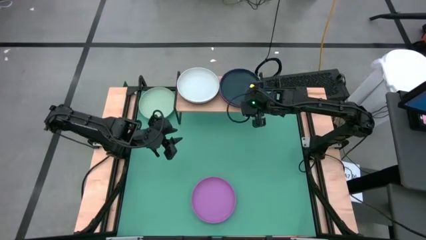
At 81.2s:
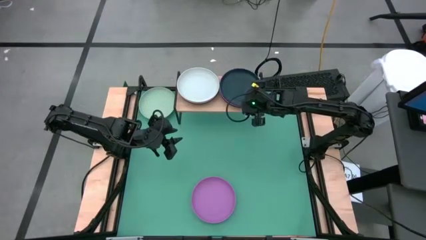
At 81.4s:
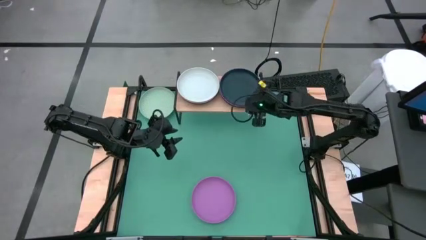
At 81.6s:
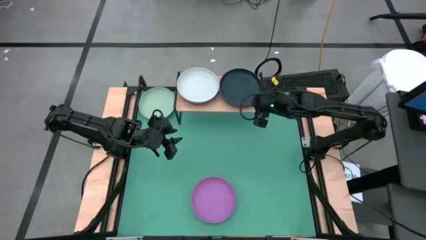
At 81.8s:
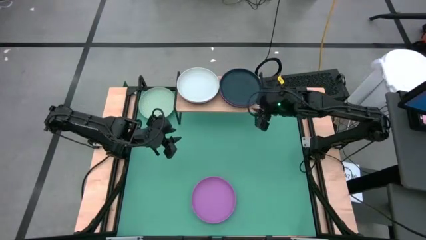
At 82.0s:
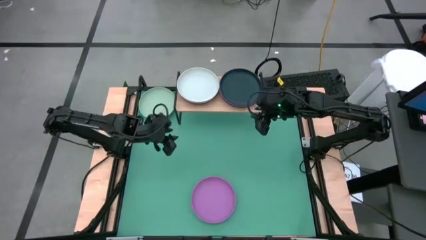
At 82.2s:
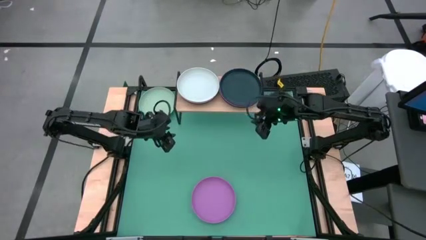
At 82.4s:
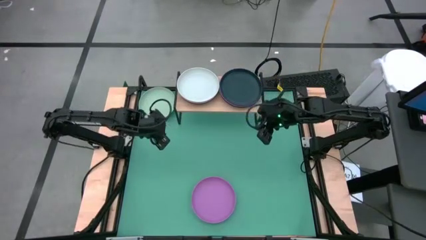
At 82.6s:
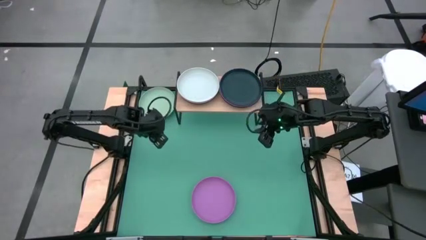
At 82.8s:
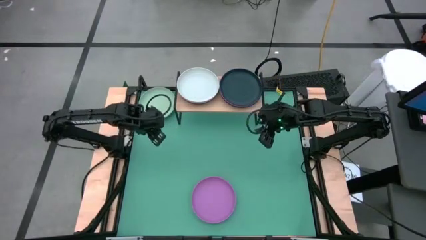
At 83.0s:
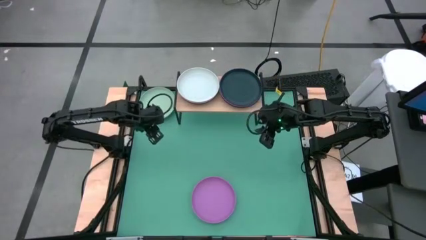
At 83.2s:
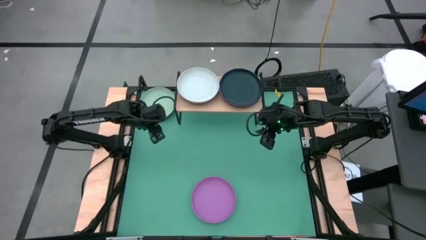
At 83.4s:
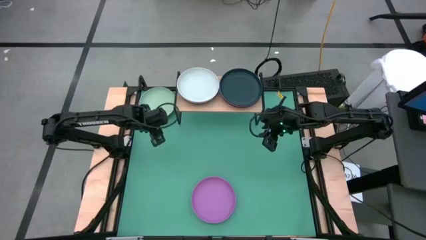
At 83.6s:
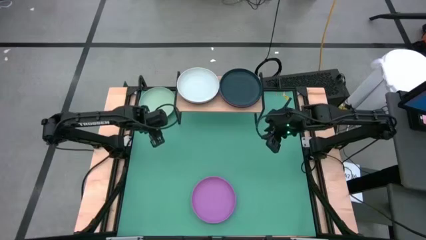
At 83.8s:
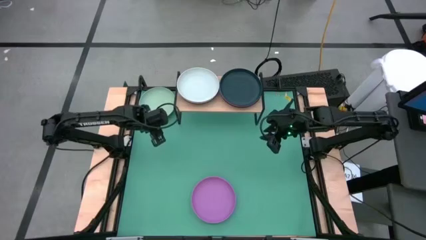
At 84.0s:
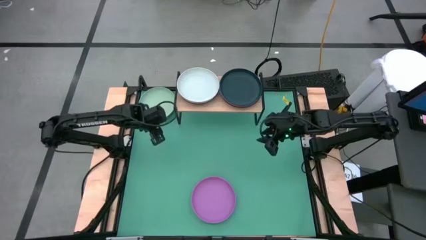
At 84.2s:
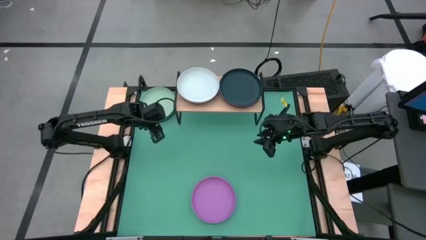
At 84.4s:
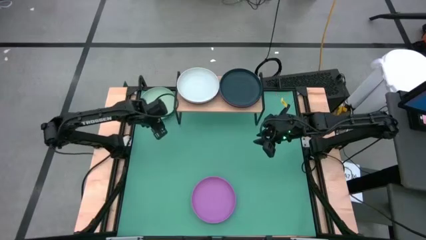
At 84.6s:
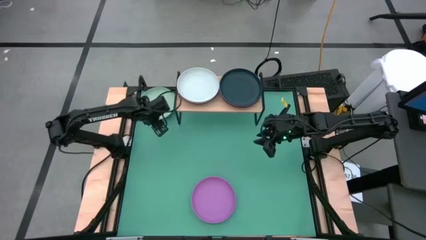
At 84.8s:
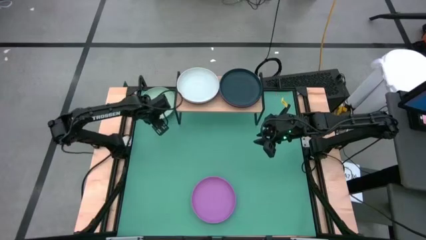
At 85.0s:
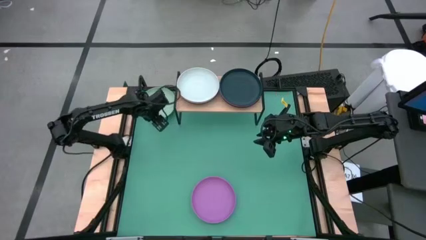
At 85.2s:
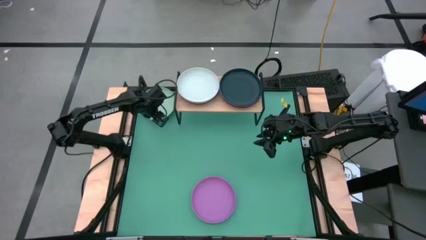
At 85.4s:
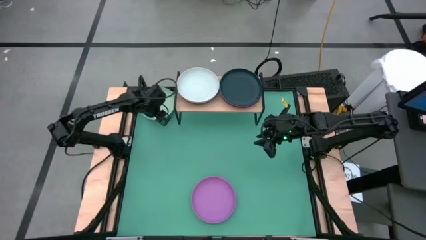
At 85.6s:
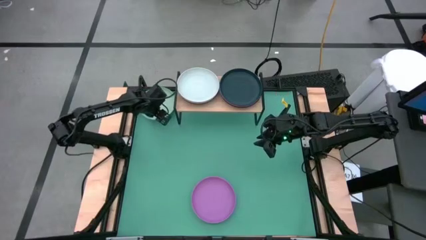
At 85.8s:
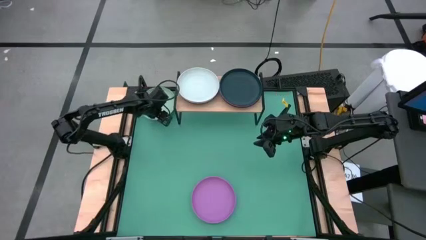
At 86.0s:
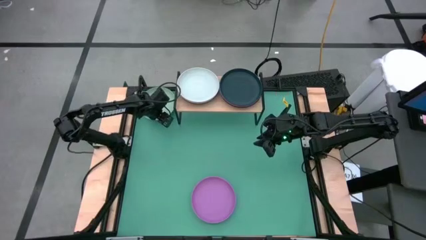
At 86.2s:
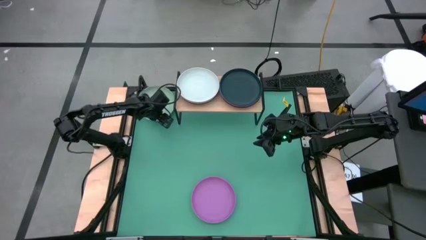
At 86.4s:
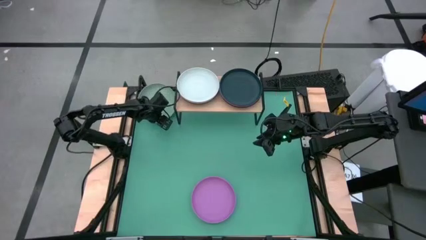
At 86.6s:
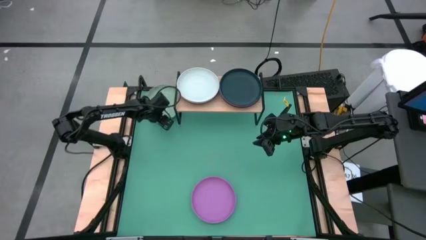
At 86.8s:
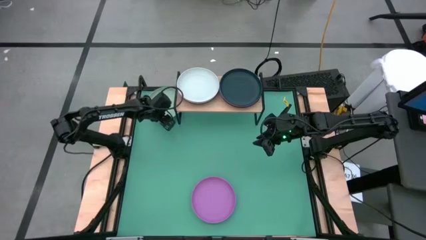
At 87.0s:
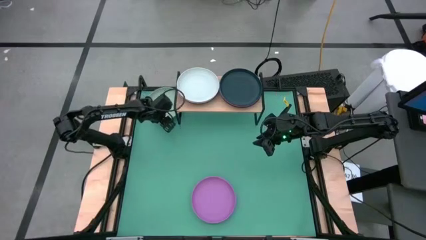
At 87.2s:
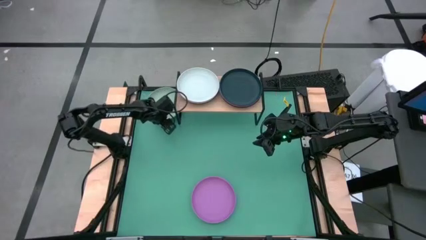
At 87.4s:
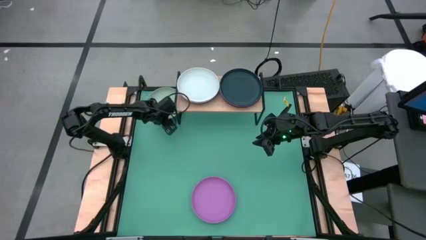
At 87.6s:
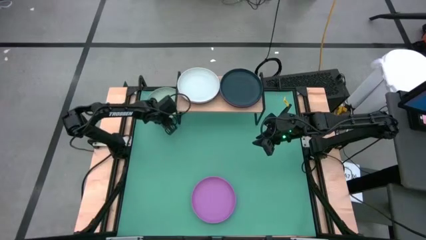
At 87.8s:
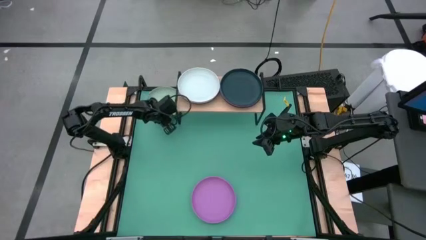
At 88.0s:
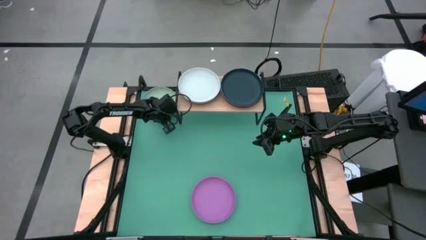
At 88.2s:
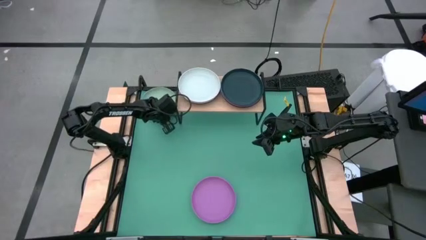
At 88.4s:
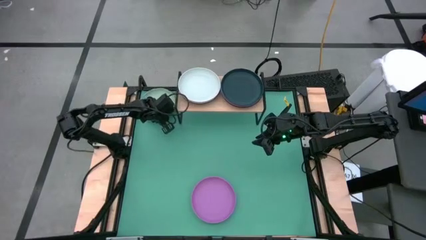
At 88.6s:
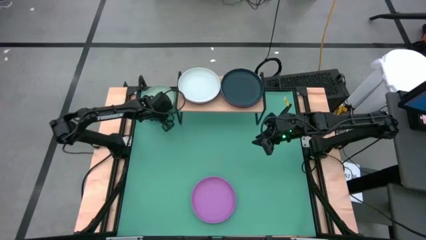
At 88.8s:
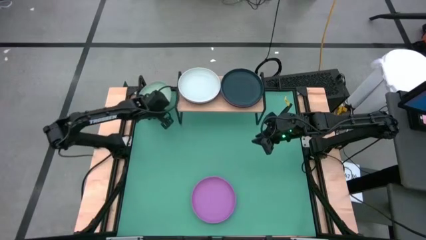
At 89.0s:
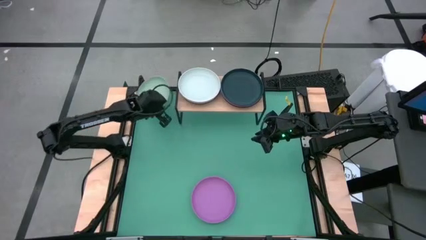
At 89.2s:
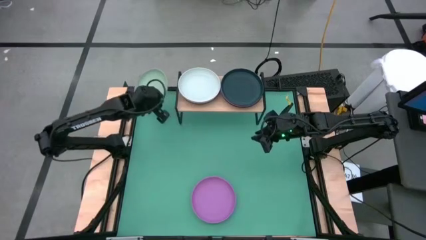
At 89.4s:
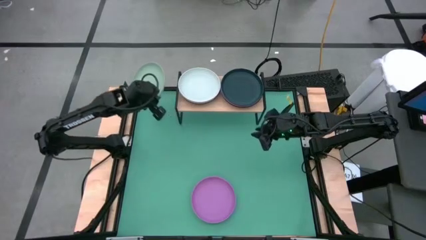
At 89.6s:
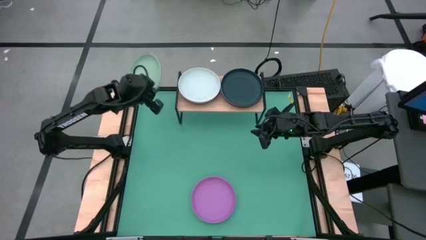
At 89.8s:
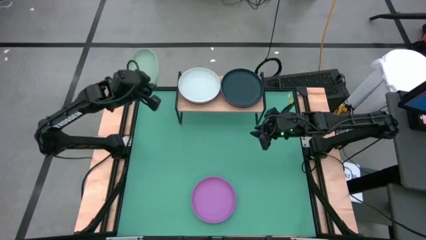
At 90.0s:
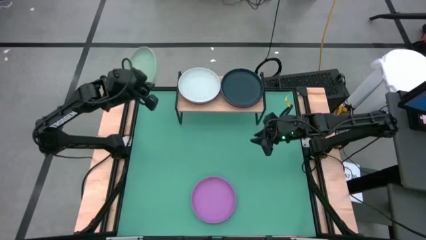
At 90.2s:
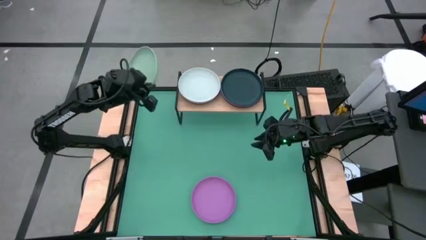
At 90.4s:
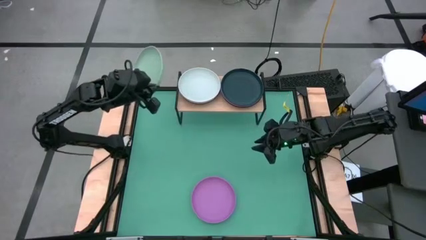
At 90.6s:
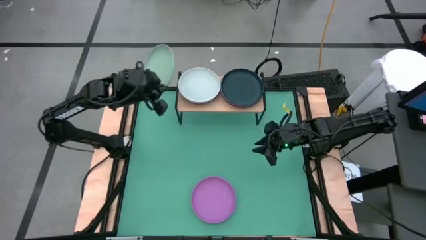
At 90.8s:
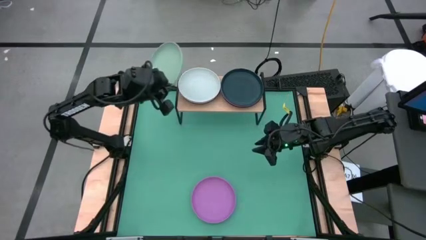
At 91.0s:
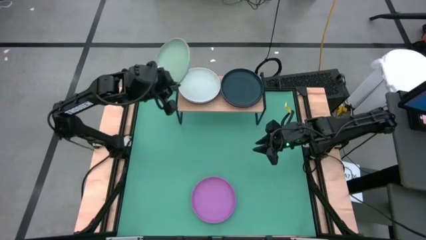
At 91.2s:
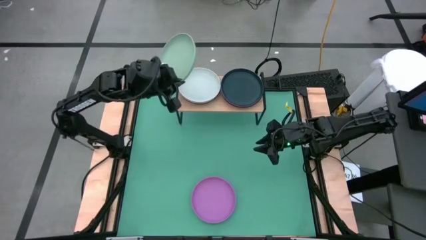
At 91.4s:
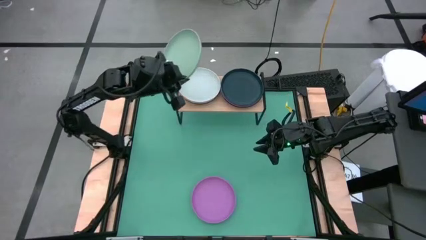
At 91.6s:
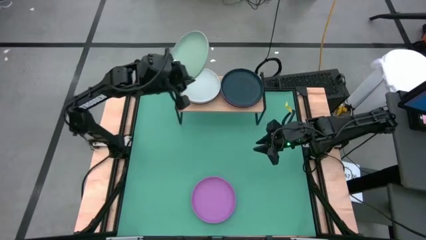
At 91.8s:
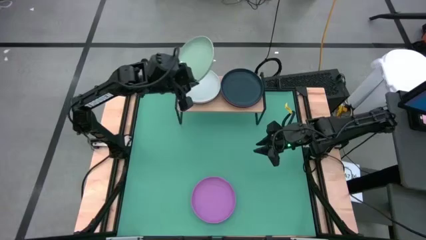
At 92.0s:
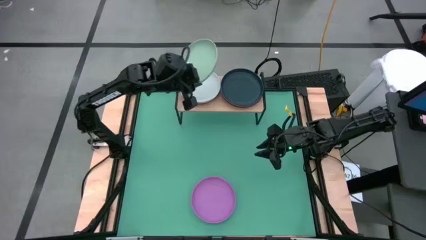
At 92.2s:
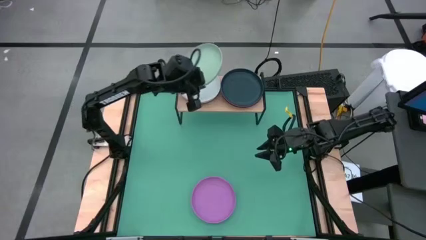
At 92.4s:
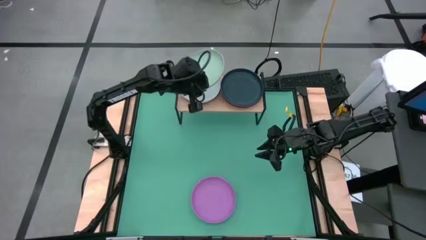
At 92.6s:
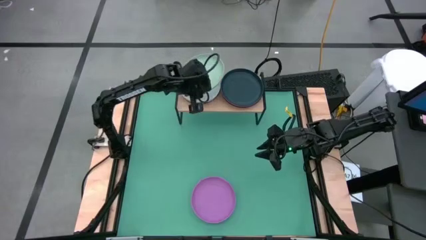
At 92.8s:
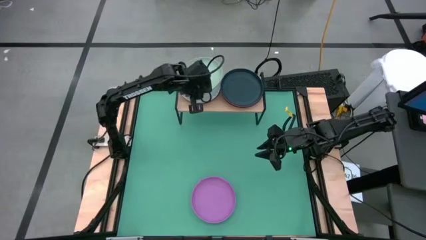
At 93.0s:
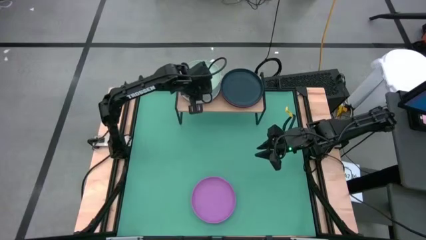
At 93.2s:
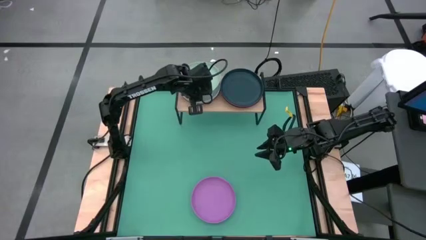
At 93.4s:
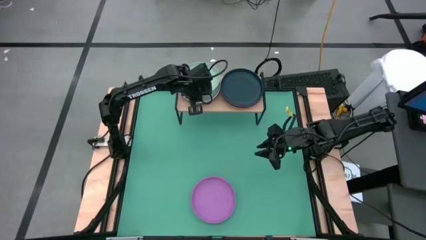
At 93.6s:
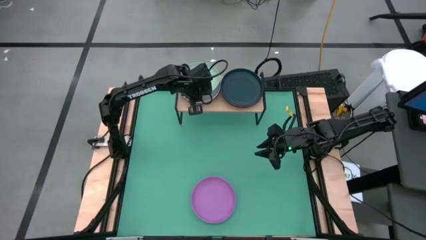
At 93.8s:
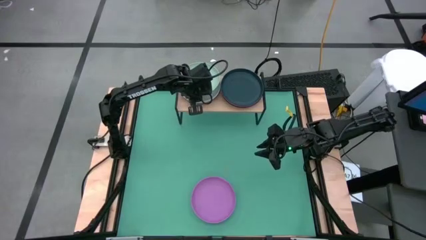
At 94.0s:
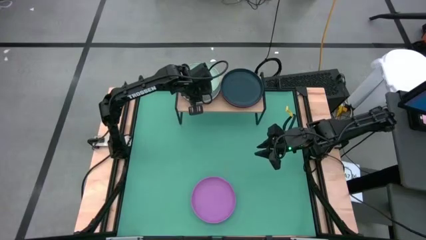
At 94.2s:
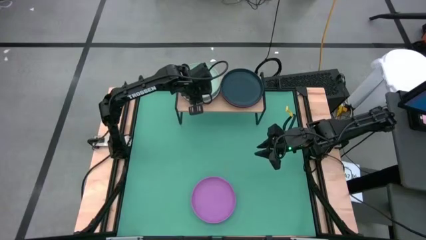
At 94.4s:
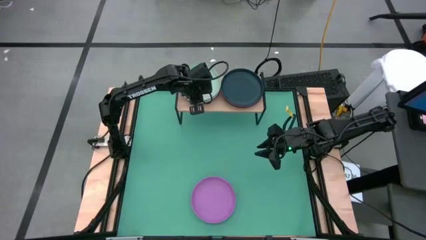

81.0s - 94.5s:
Task: Place and stack plates onto a shelf
Stack the light green plate on top of the white plate on the shelf

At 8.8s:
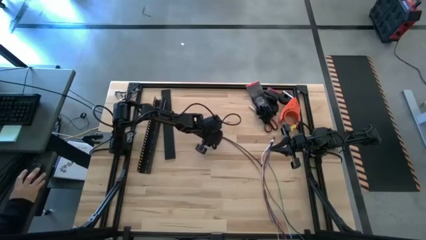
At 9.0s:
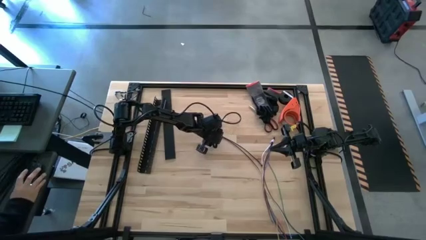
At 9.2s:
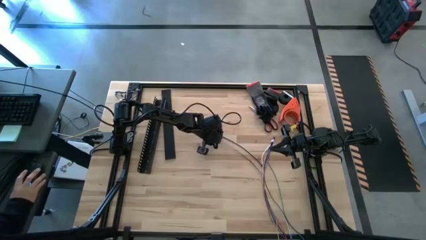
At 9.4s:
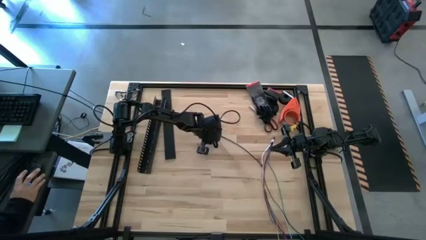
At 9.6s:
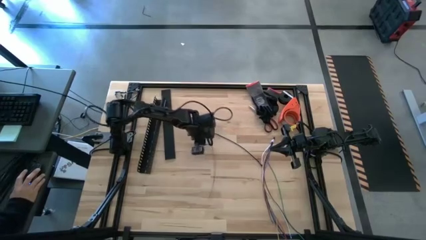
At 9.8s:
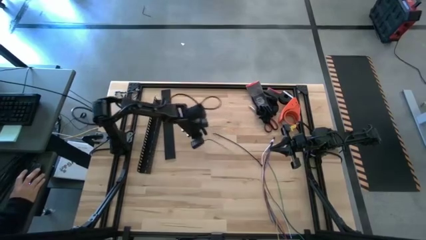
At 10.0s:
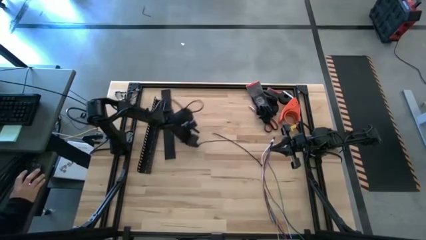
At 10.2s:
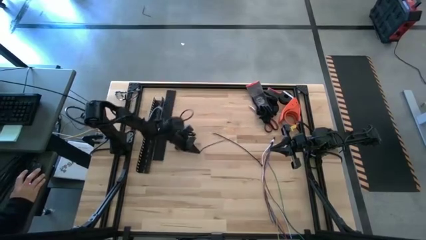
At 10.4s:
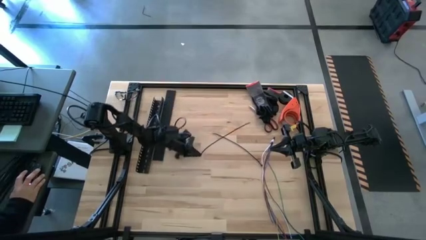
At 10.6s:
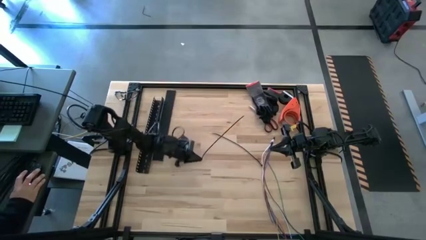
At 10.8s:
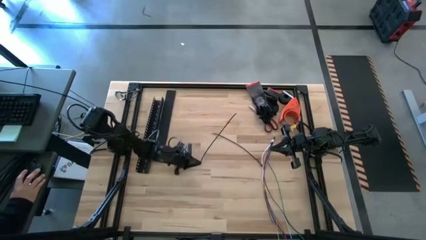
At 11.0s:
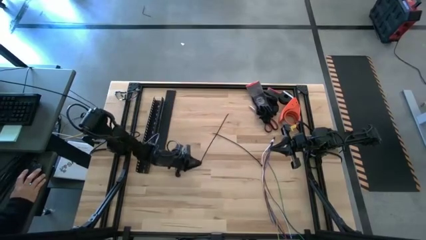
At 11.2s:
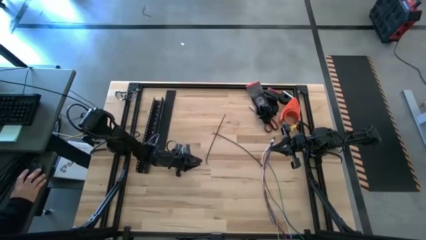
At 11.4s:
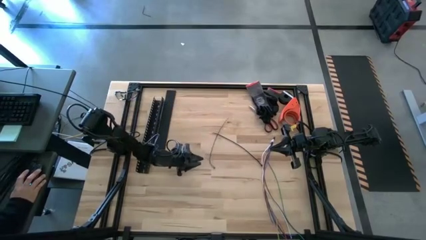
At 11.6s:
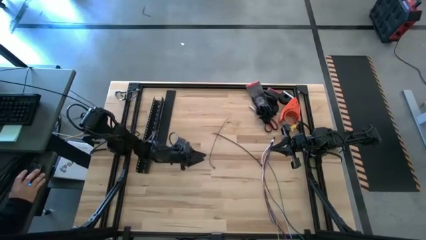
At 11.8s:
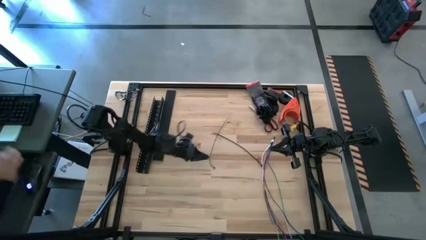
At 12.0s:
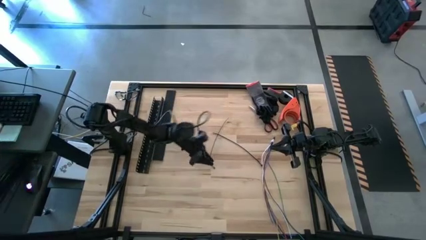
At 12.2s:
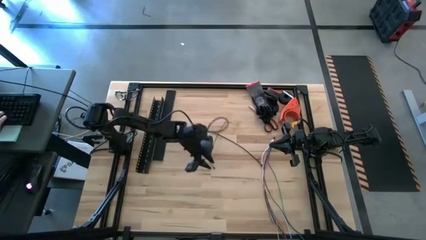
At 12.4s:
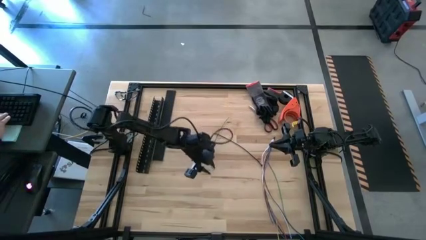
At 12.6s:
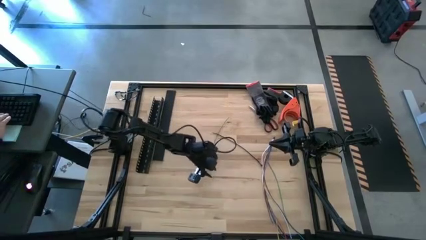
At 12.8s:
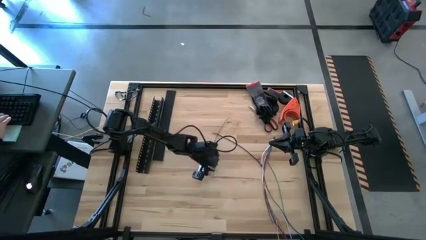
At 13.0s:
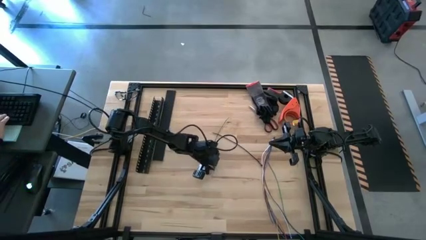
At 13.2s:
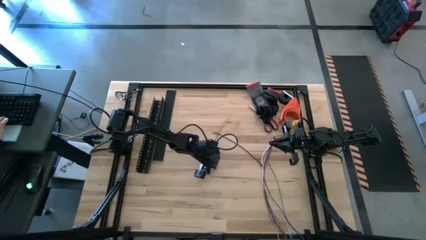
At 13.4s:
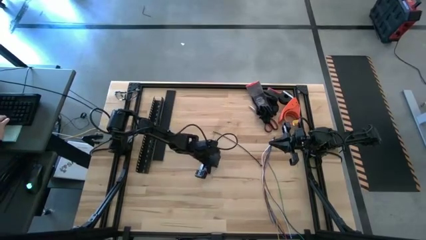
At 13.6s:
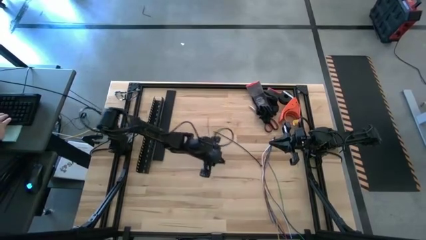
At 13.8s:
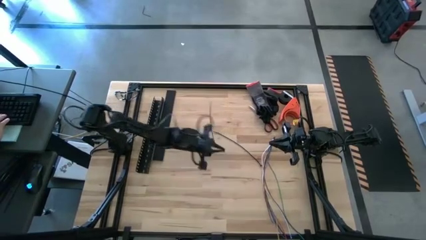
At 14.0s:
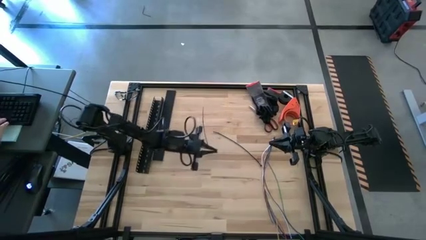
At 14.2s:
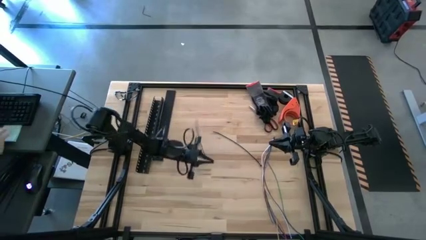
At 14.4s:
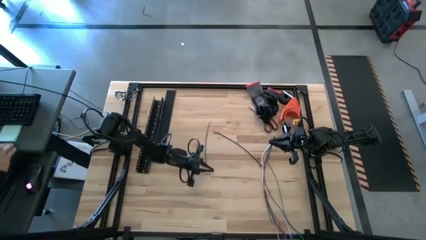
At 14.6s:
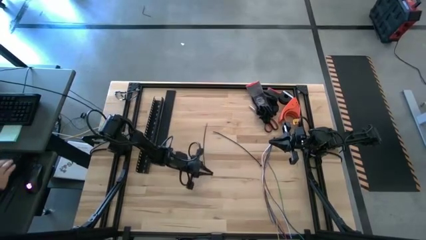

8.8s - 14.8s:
Task: Ziptie cables
Prepare the left black zip tie
